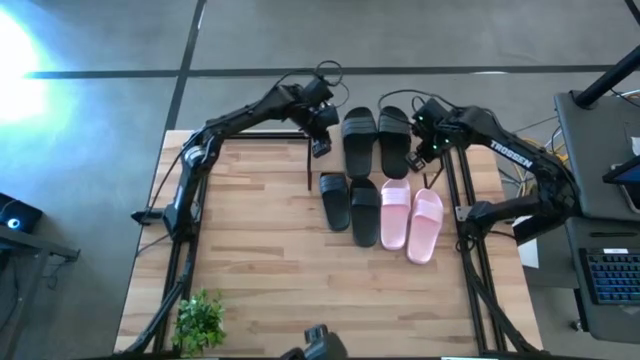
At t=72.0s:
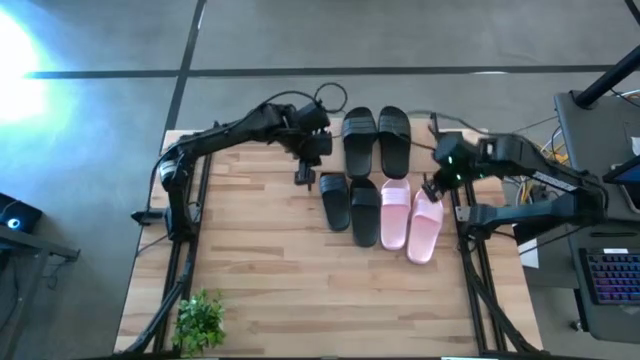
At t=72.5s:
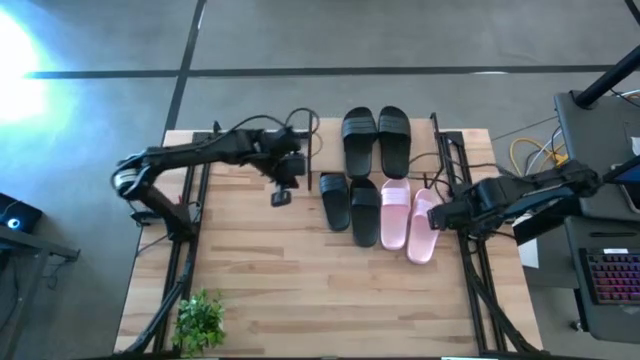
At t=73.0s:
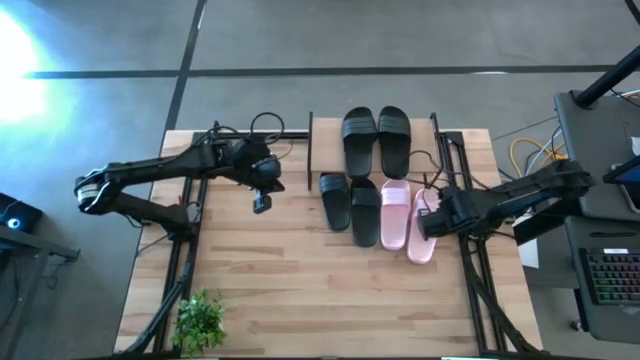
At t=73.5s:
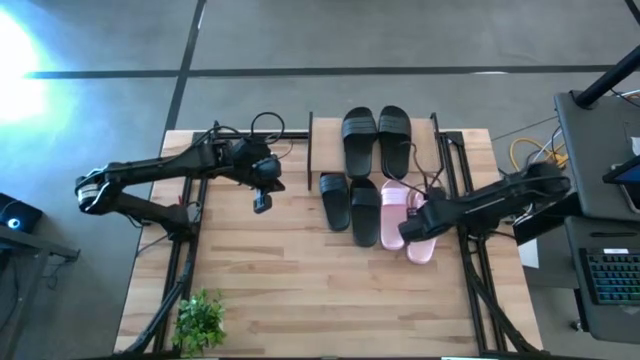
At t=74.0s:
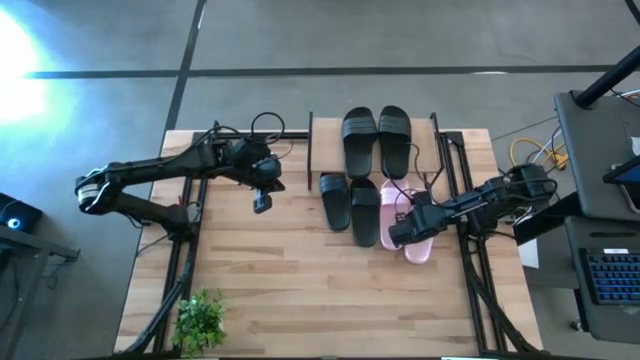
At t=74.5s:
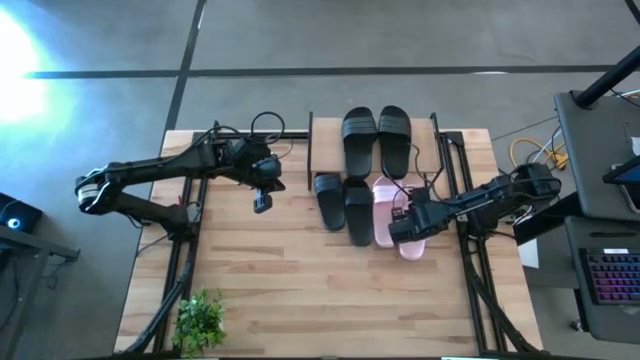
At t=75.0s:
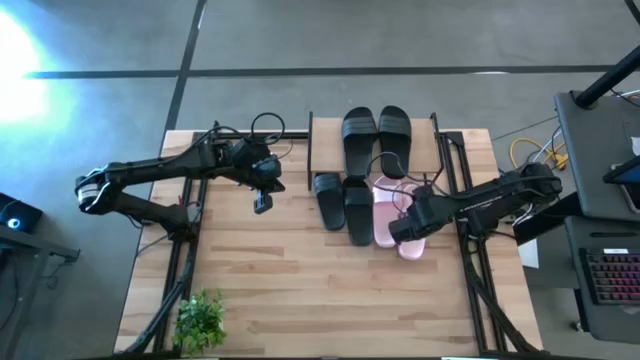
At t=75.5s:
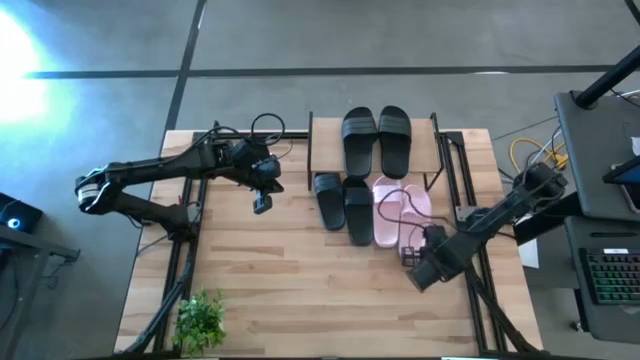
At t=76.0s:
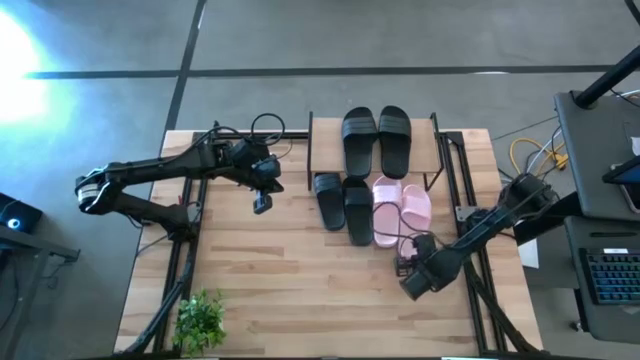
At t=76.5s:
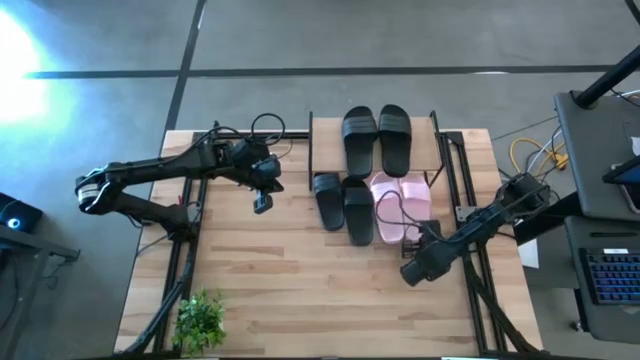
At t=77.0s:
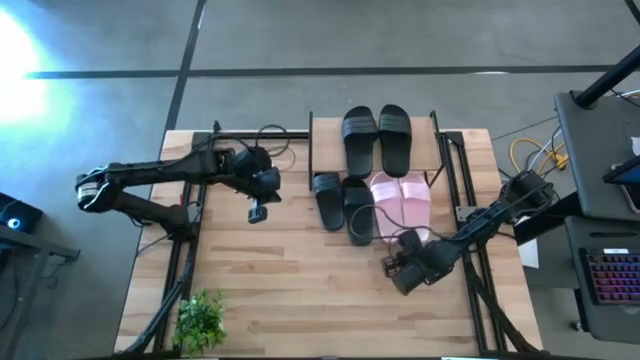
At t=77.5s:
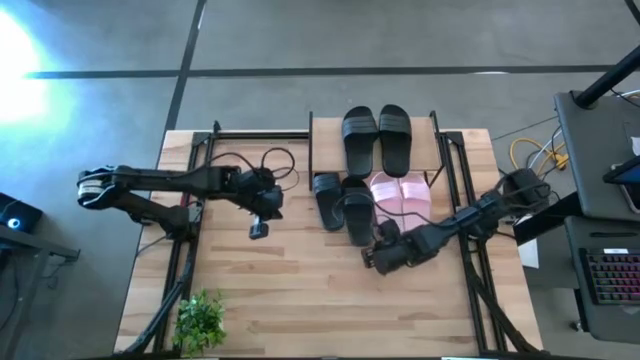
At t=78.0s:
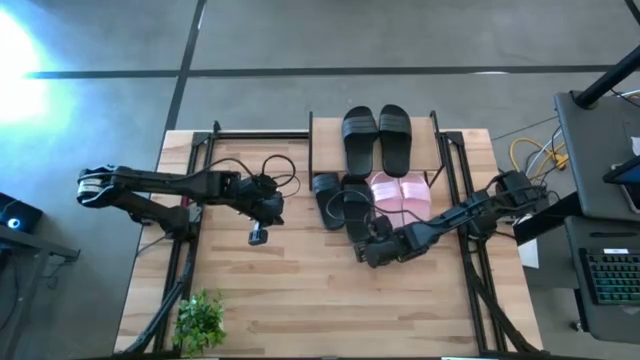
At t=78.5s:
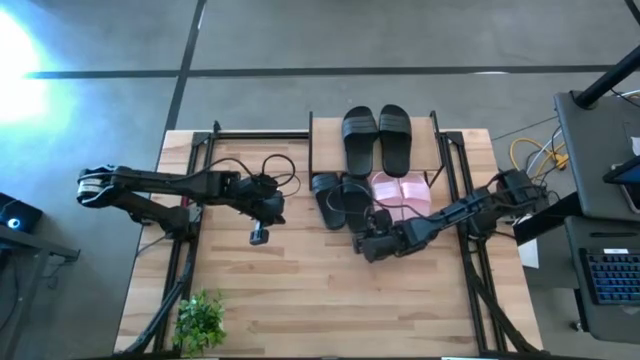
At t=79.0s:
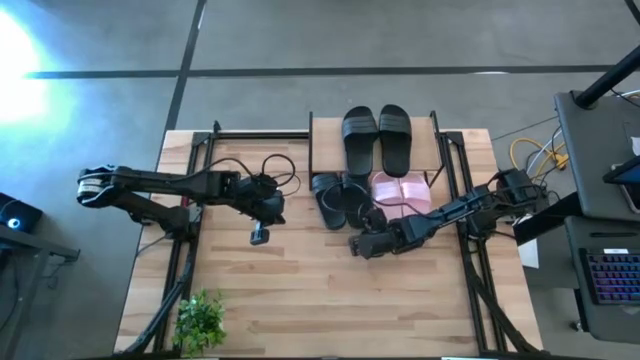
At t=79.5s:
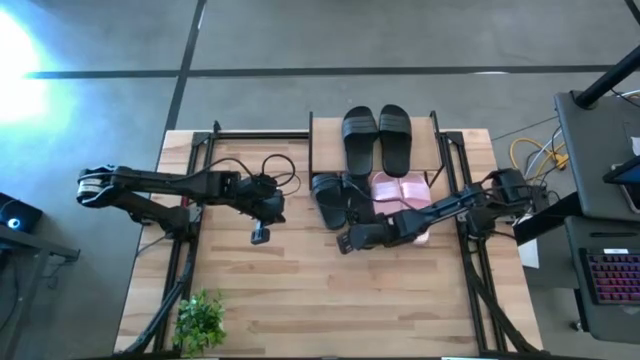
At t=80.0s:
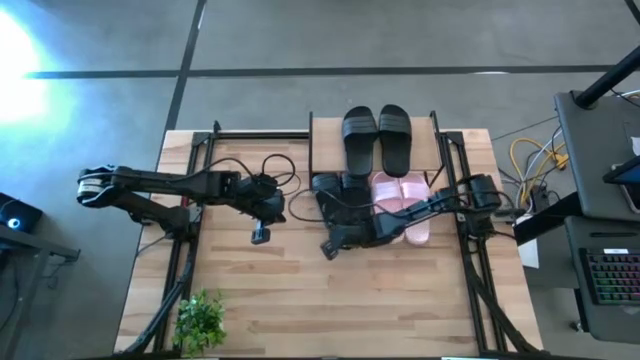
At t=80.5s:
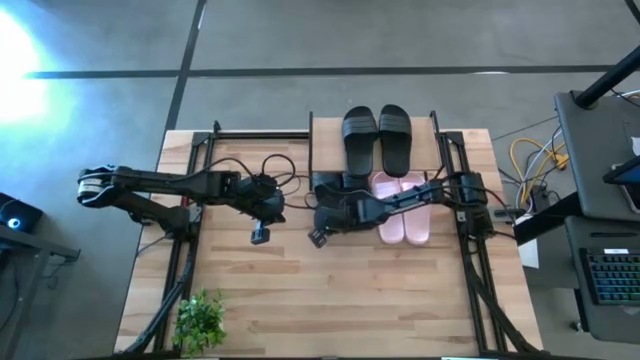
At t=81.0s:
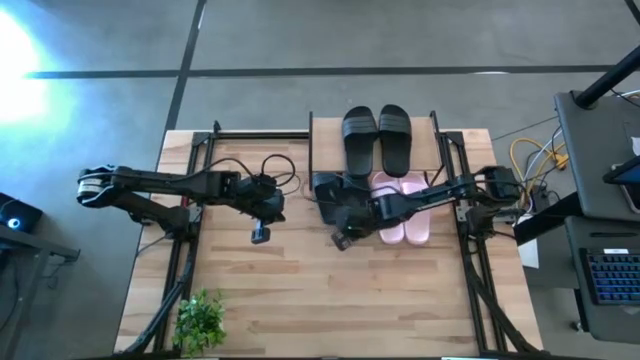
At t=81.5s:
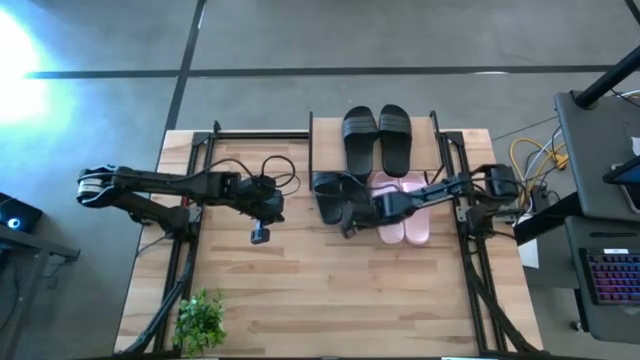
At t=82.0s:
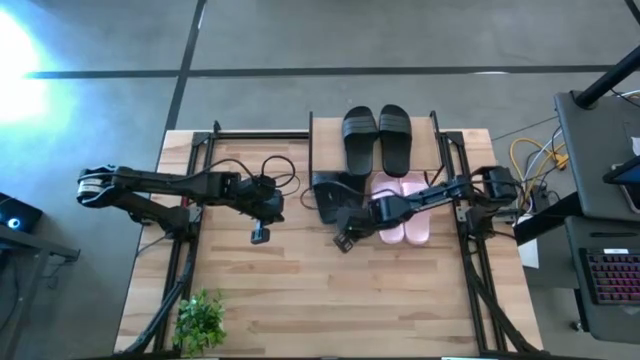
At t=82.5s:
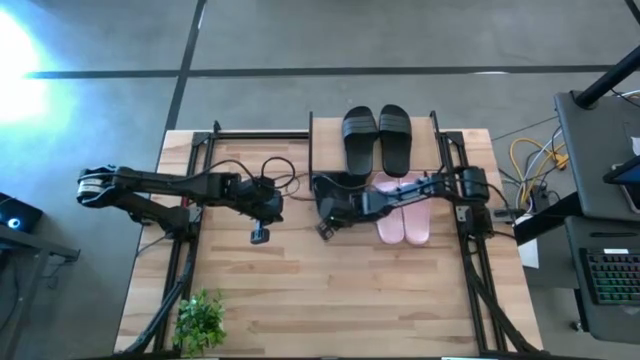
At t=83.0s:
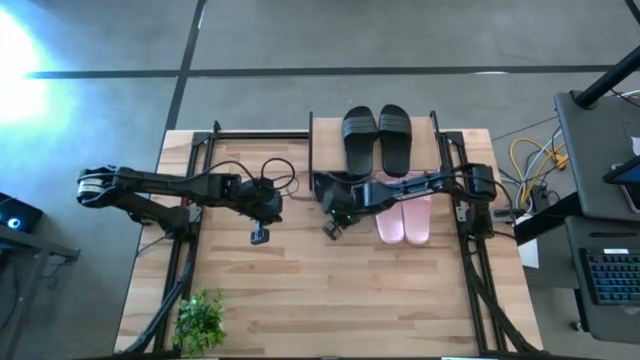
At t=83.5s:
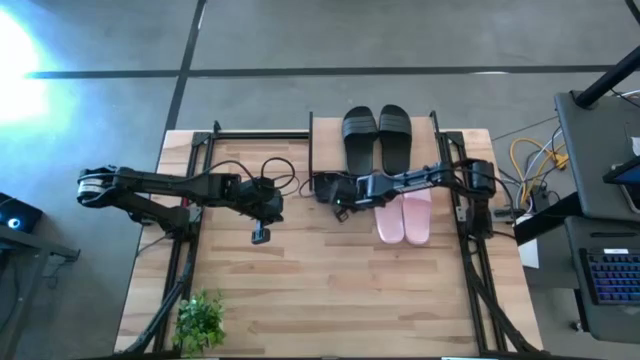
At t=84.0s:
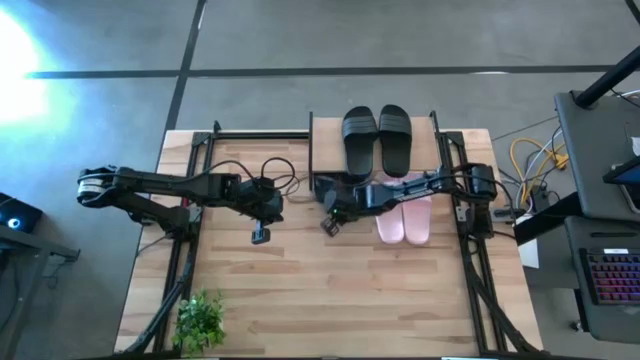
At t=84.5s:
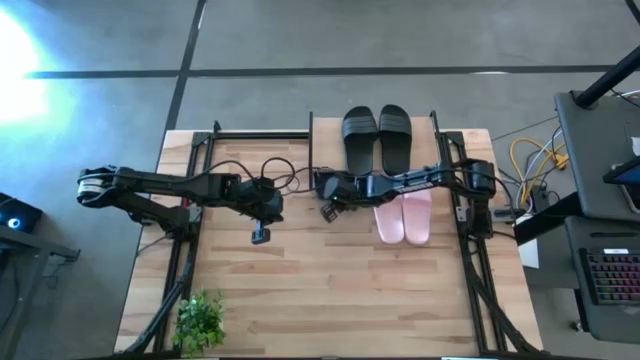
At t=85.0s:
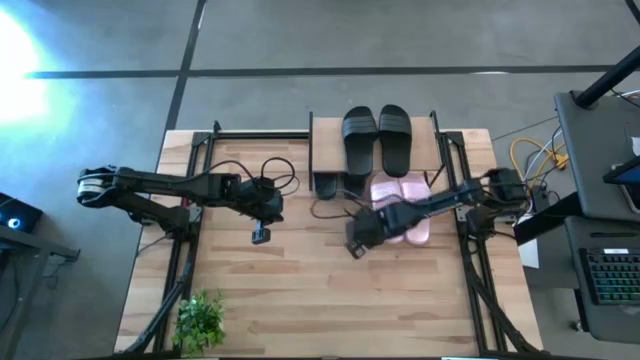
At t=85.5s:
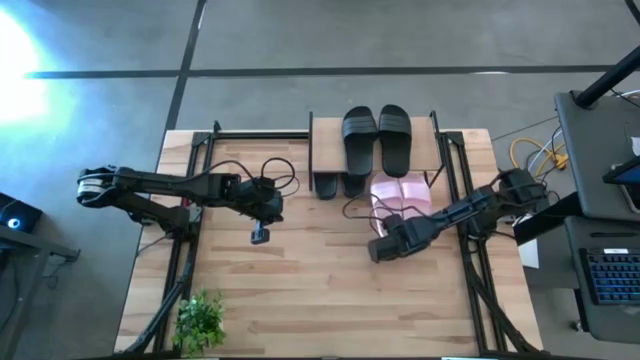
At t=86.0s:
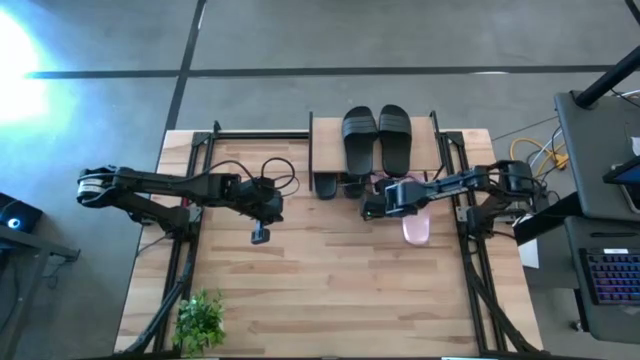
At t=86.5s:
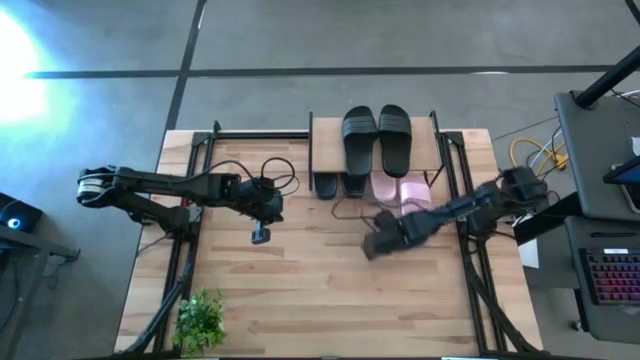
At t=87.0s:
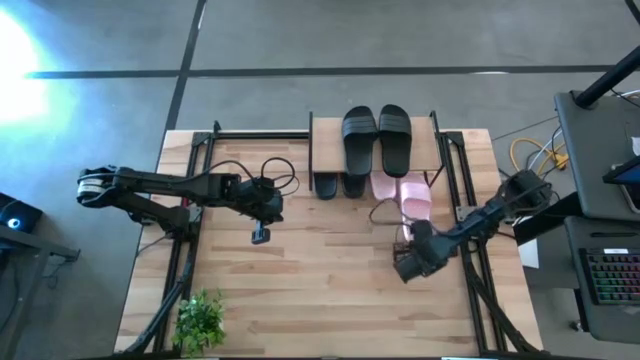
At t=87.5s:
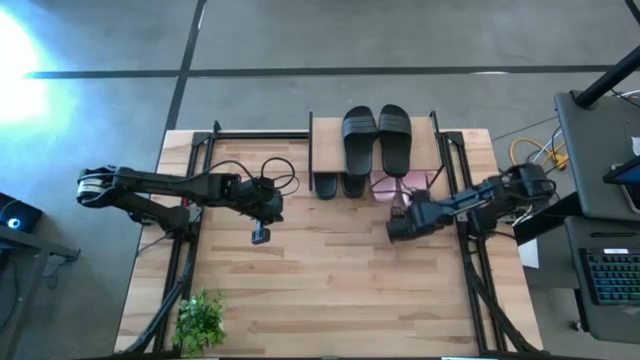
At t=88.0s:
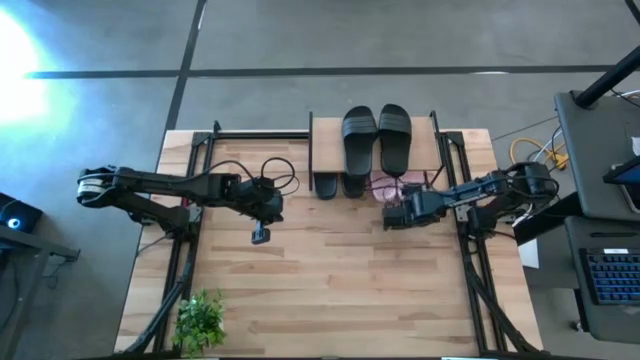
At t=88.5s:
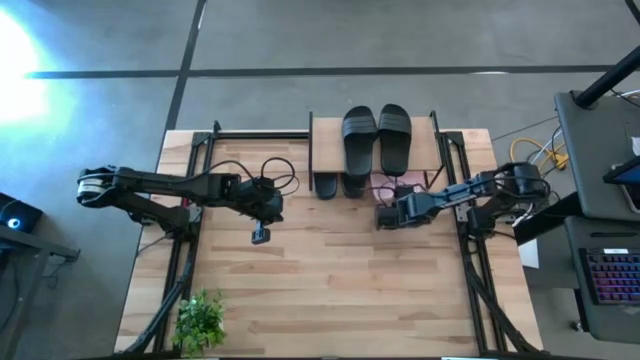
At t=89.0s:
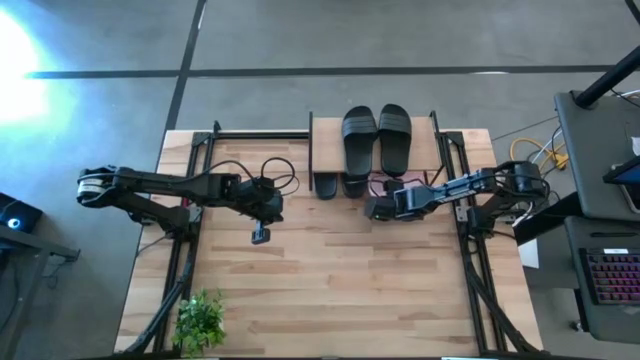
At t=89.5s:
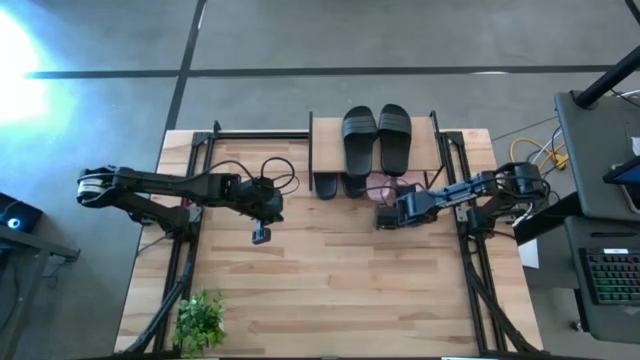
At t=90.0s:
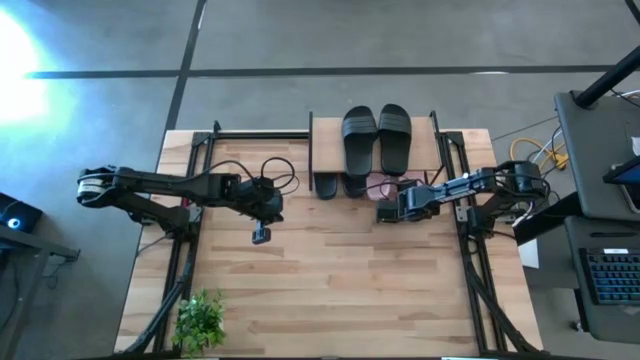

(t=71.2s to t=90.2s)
Task: Pick and place slides into the shelf
Adjust the slides under the shelf

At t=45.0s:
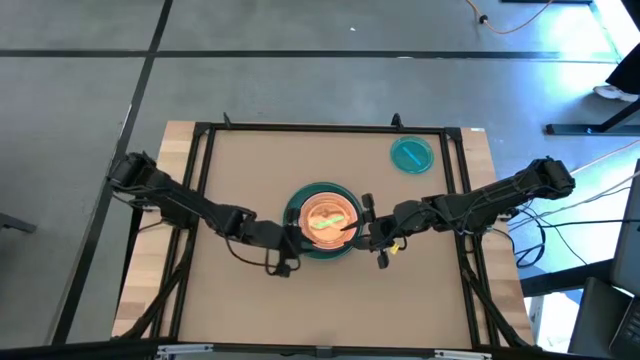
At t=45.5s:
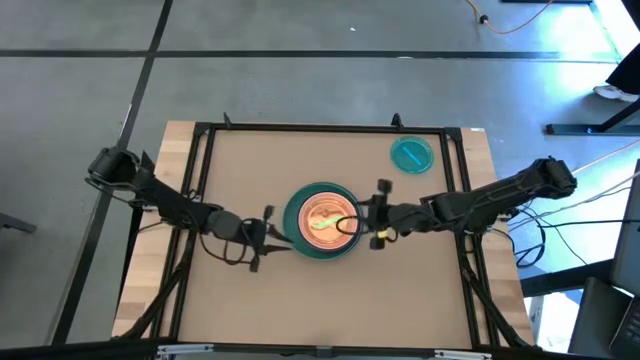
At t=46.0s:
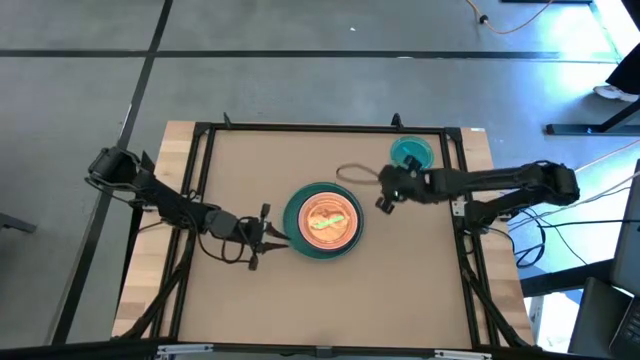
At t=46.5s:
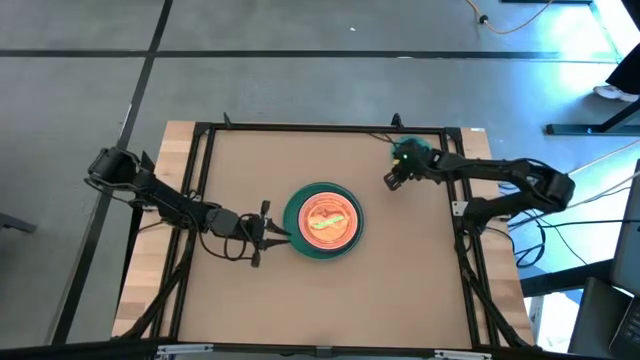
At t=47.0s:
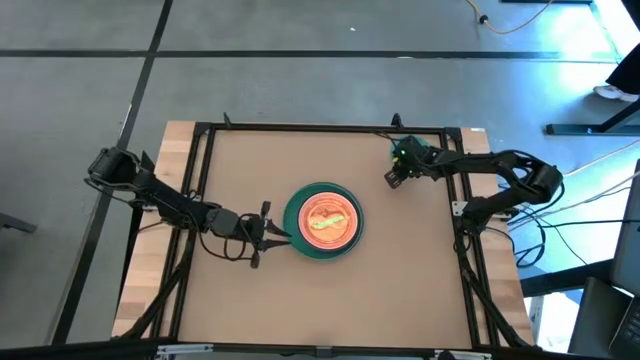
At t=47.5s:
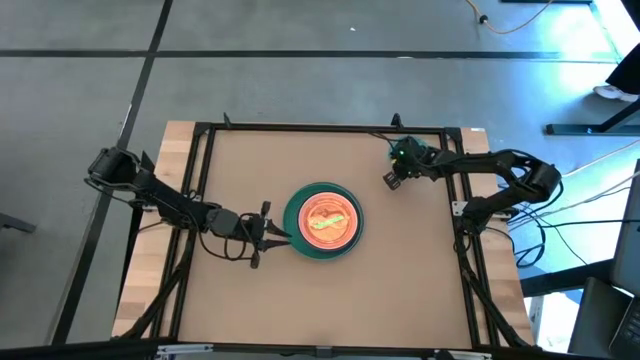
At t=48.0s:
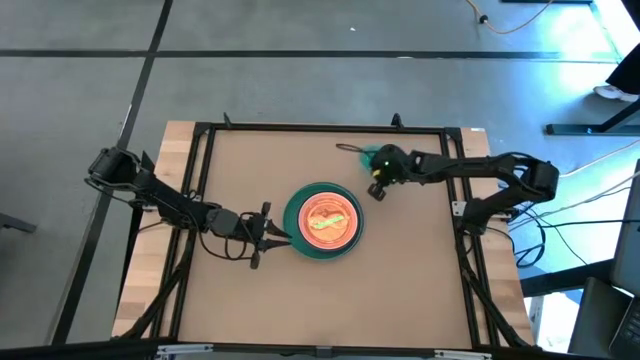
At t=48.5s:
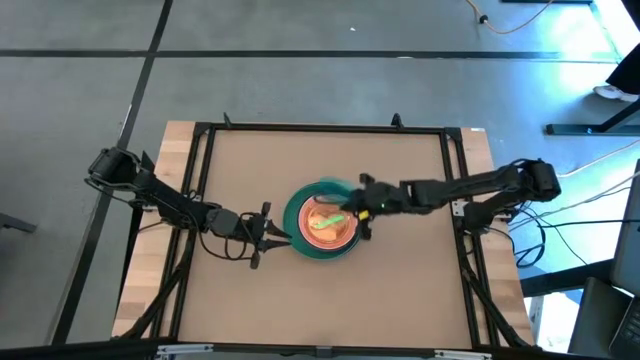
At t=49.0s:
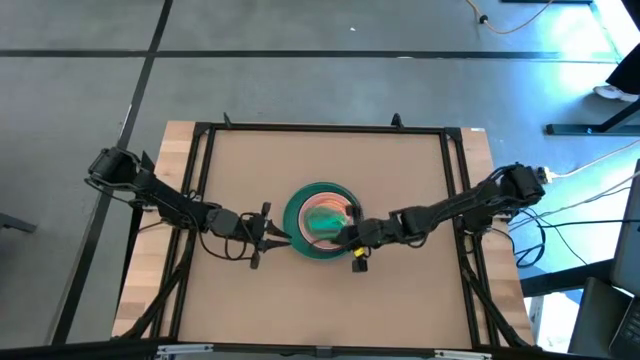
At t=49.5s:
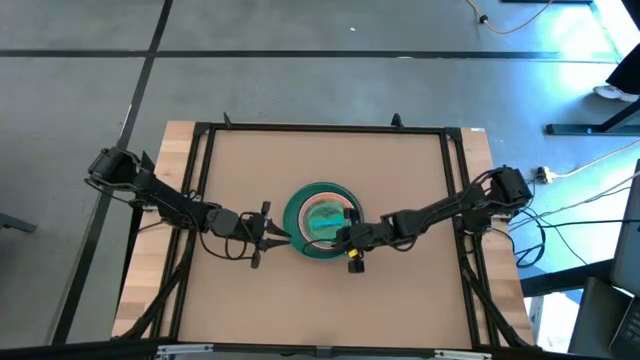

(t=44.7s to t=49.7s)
Task: Stack plastic plates
Stack the transparent blue plate on top of the transparent orange plate
